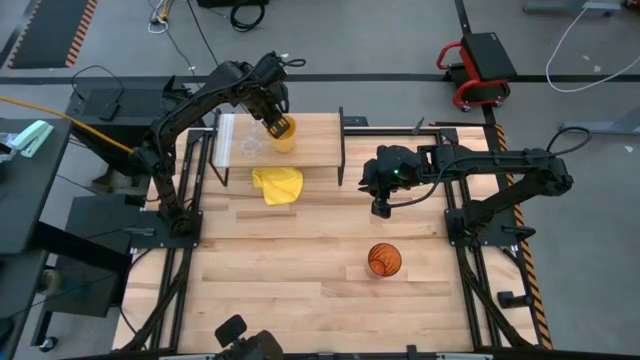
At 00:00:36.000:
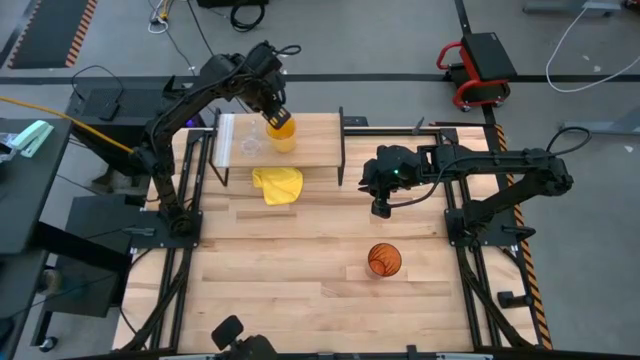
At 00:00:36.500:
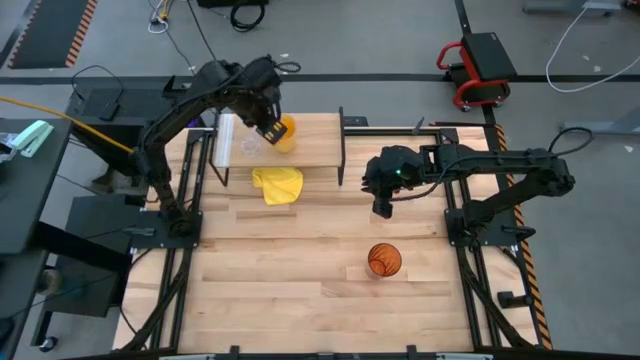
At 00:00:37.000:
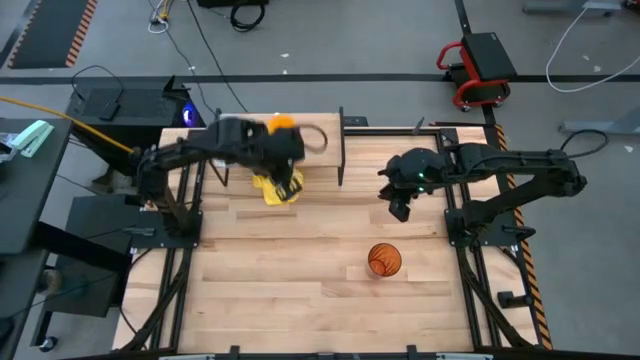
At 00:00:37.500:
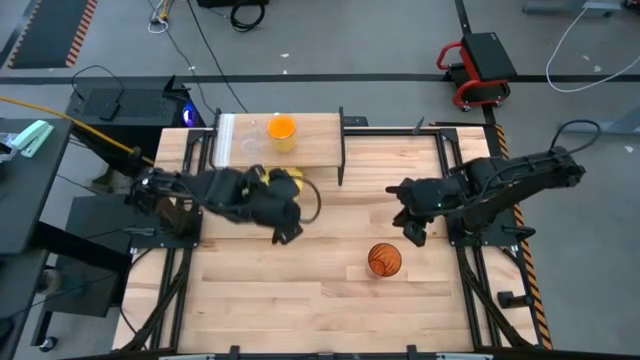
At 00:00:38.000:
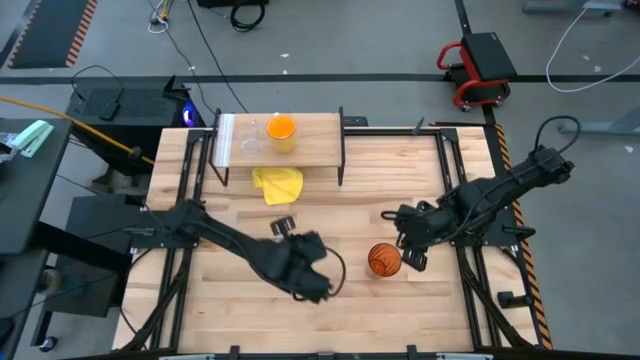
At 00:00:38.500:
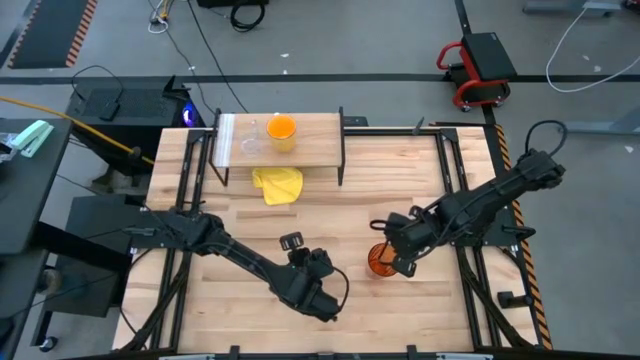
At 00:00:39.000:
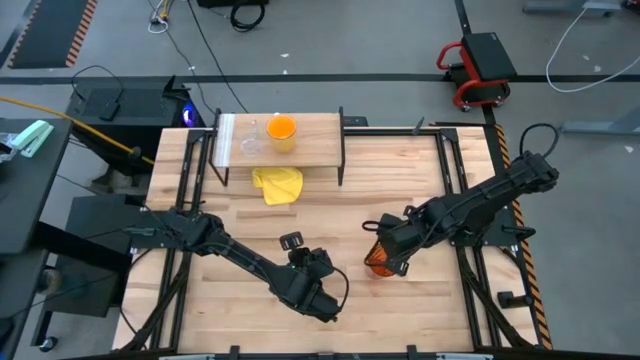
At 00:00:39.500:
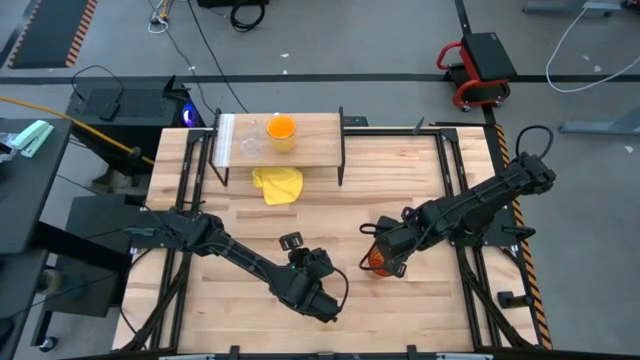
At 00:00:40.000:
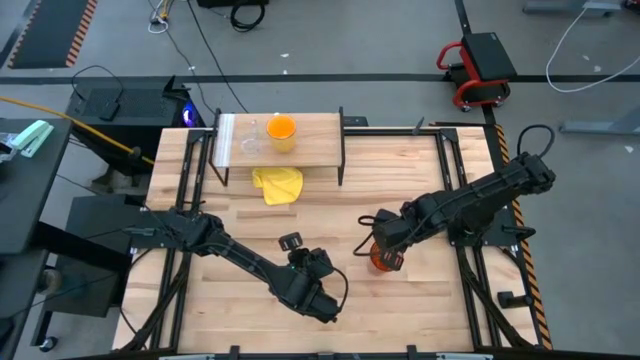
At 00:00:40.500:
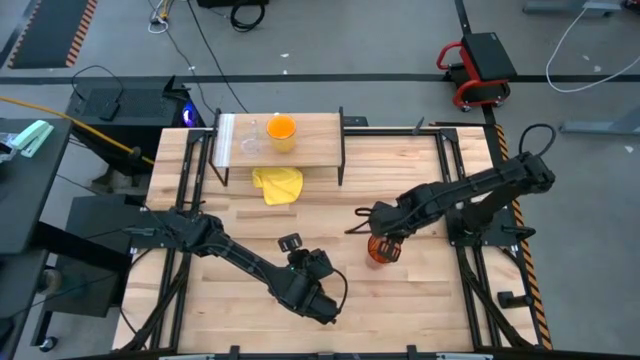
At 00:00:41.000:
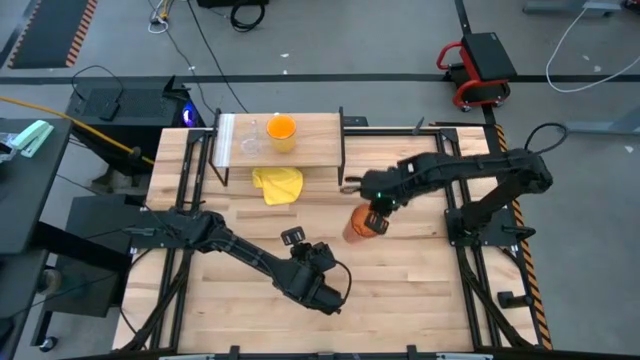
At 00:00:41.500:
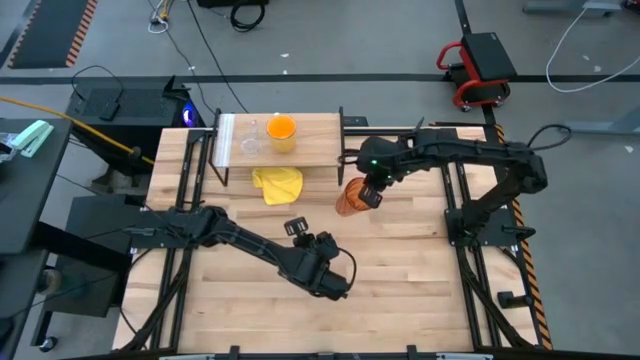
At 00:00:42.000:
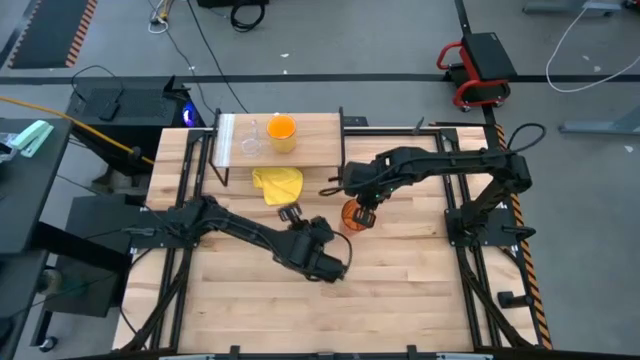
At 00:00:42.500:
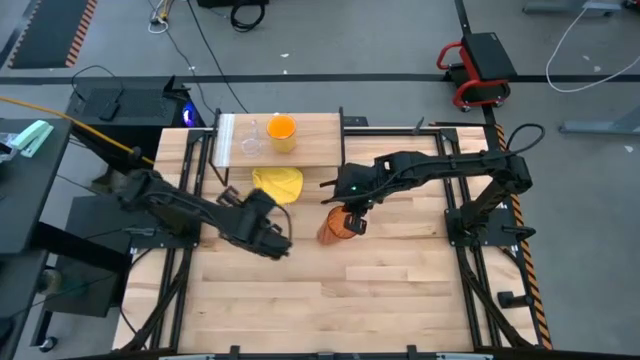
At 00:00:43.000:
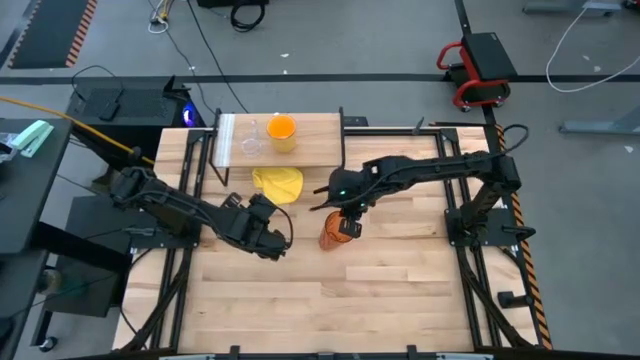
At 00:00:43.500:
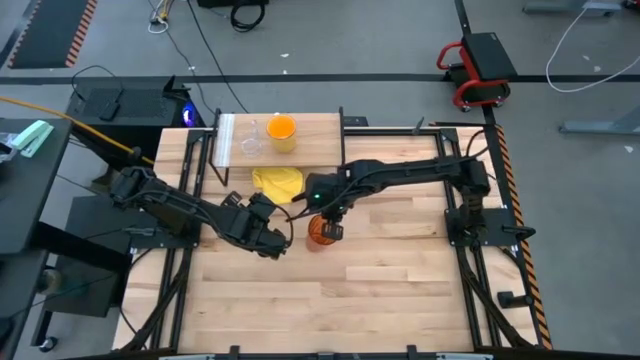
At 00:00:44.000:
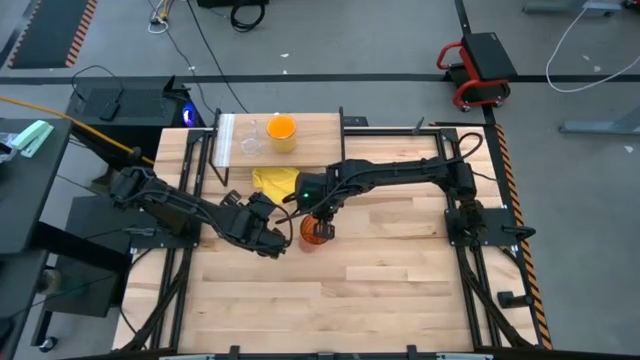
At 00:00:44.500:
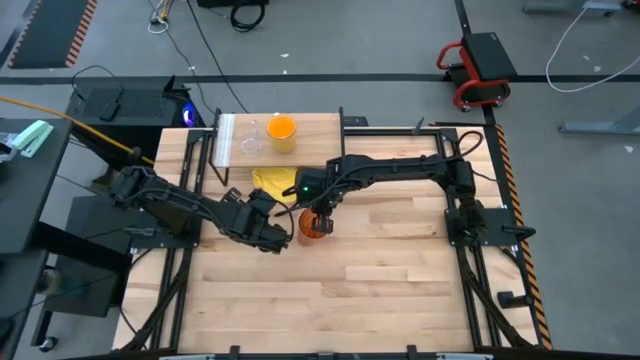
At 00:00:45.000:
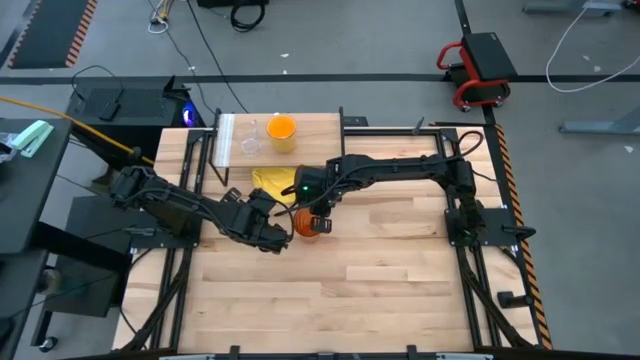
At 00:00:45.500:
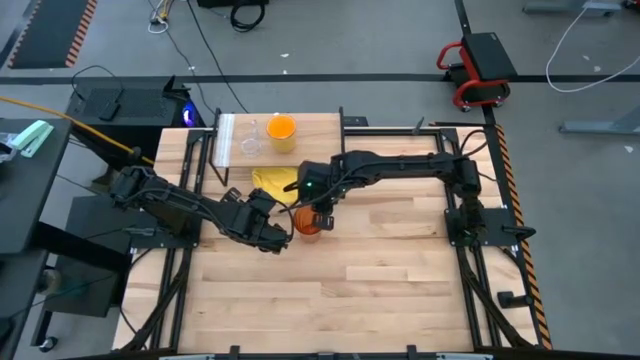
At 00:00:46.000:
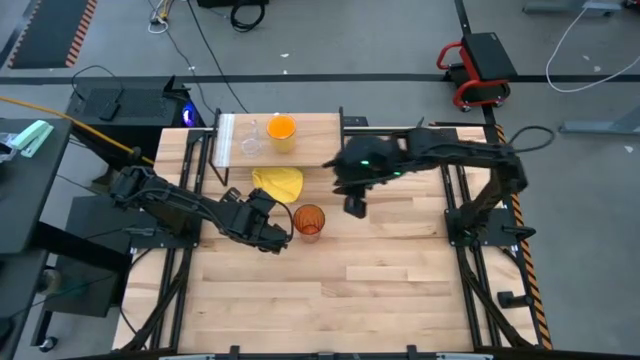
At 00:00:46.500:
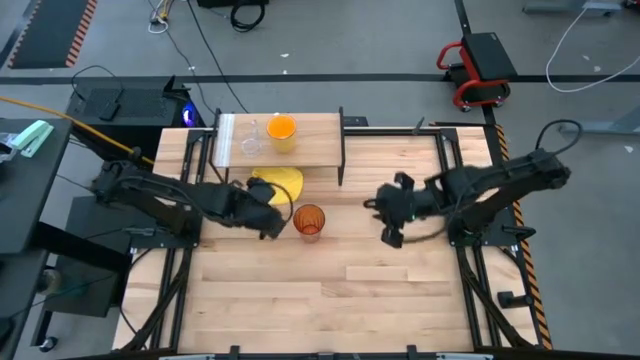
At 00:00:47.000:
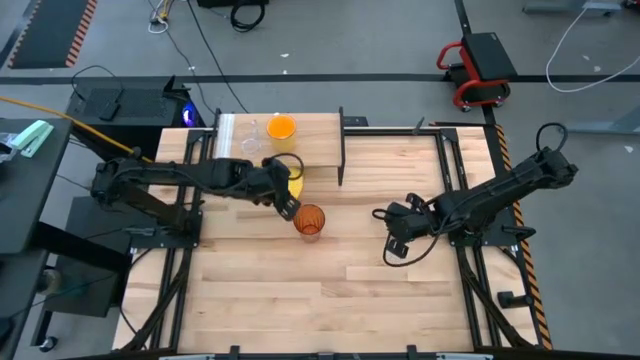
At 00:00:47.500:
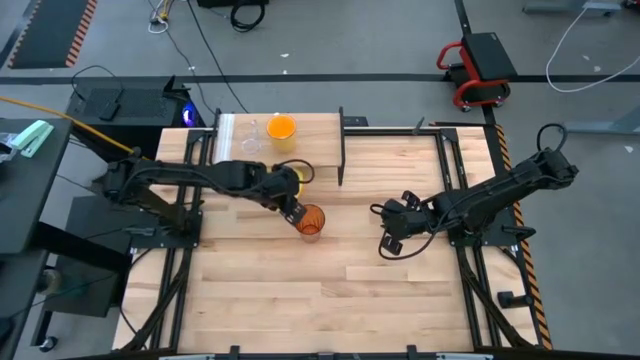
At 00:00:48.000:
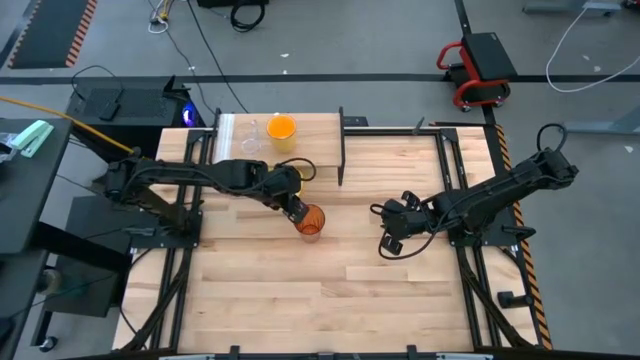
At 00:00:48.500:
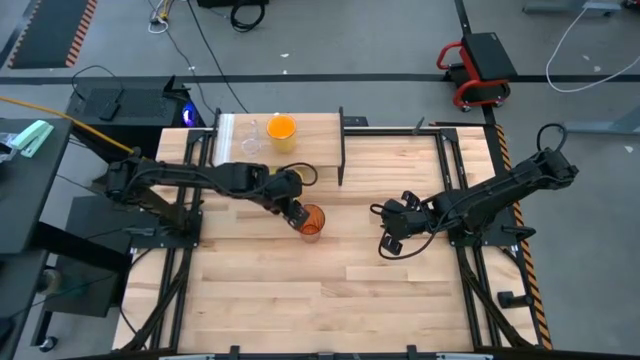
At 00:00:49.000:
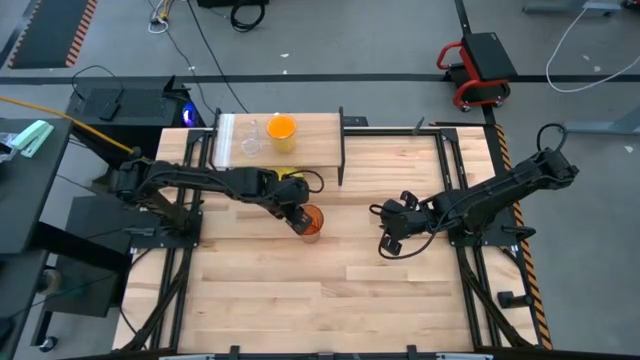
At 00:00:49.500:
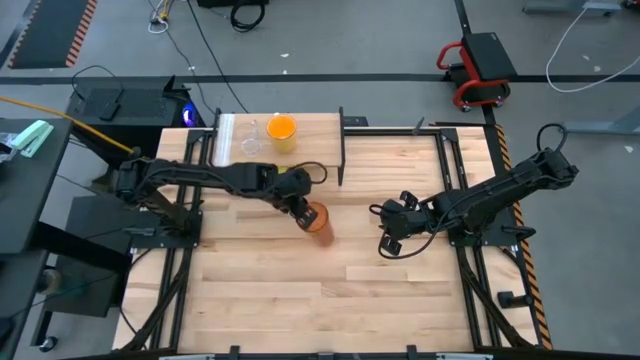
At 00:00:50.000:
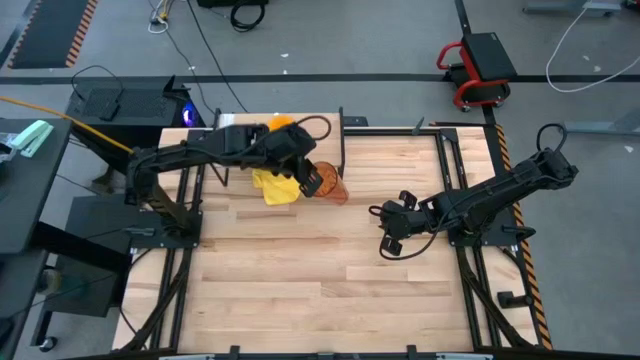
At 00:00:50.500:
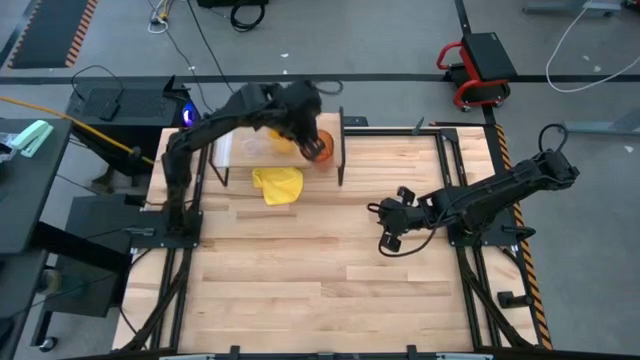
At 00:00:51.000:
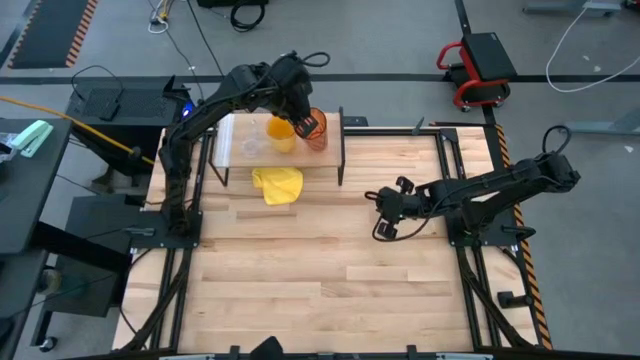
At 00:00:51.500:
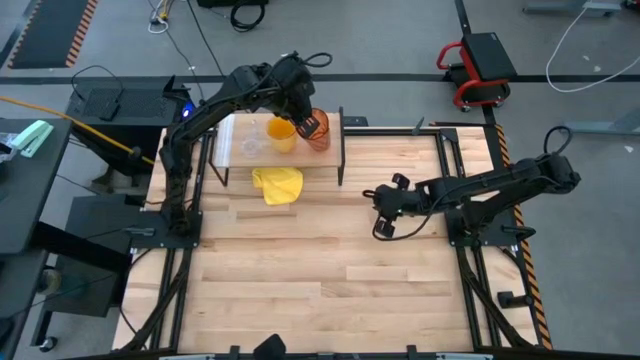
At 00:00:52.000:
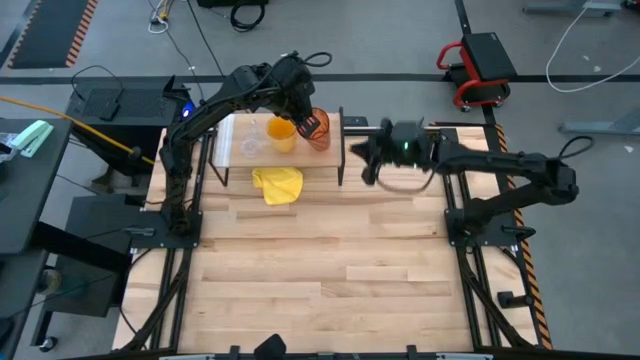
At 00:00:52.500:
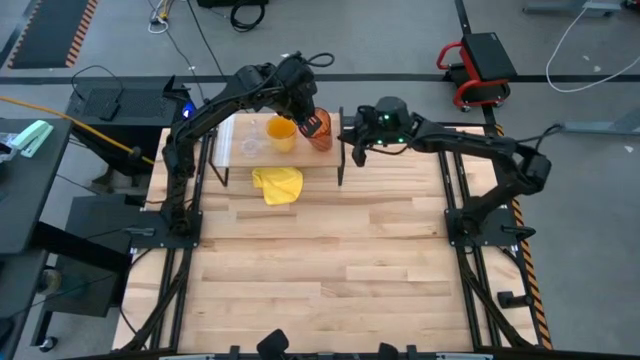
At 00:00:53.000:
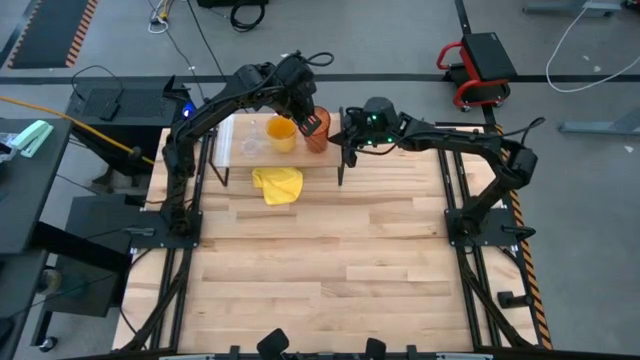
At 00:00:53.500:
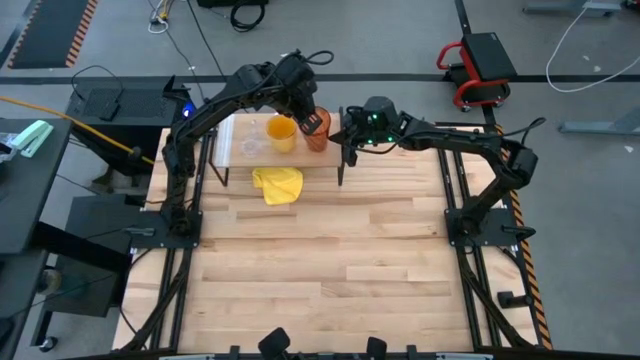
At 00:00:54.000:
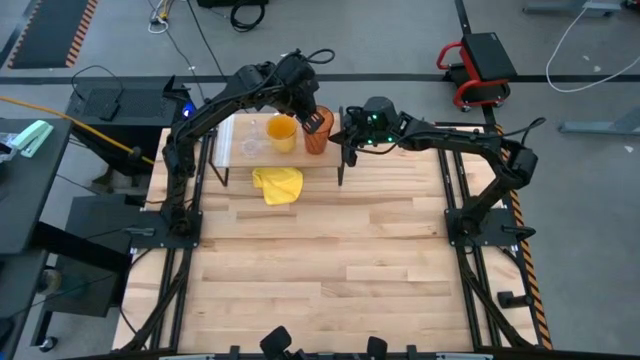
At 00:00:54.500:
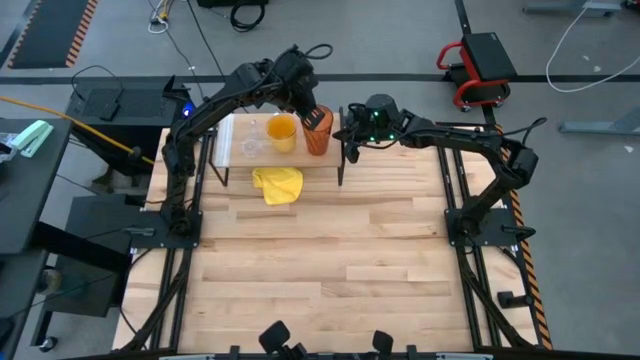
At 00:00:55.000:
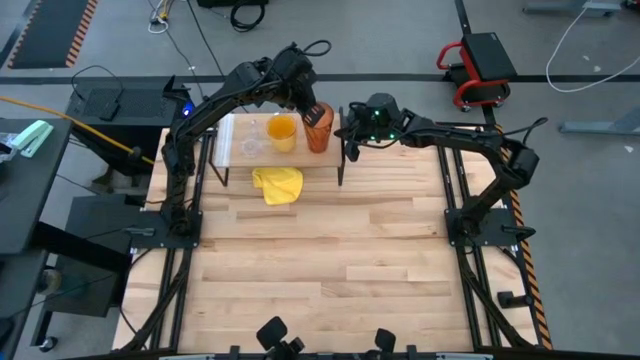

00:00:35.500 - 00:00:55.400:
Task: Stack small to large cups/mugs on shelf
Put the orange cup on the shelf
